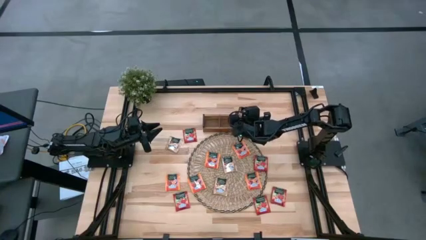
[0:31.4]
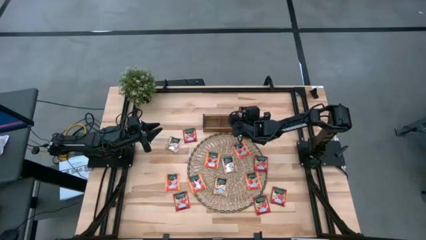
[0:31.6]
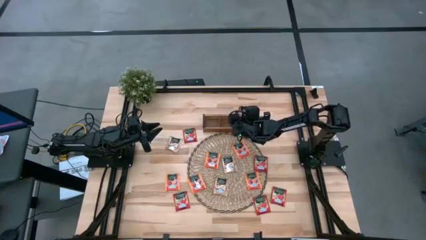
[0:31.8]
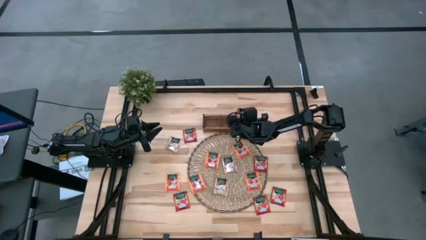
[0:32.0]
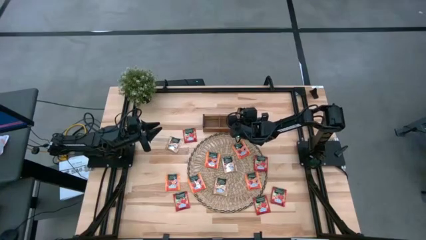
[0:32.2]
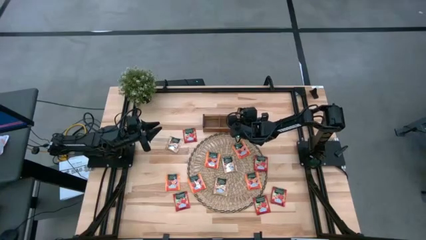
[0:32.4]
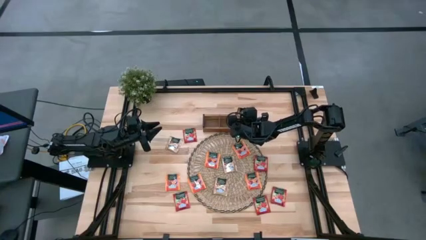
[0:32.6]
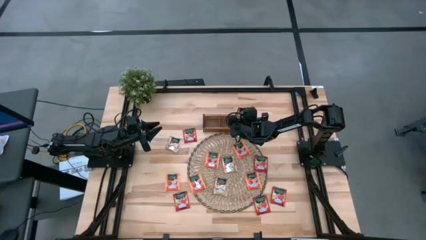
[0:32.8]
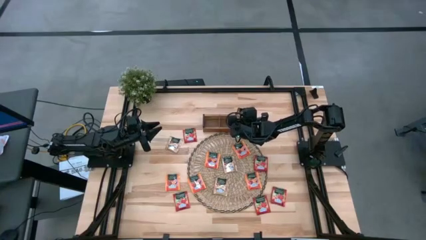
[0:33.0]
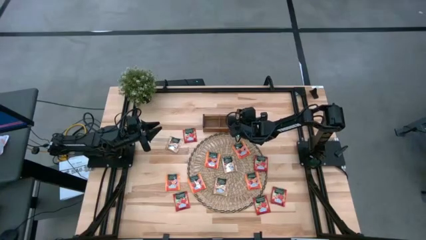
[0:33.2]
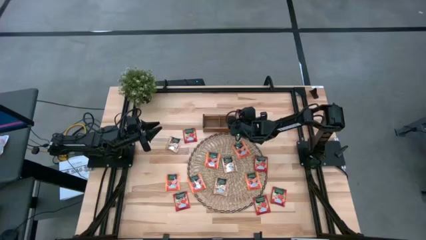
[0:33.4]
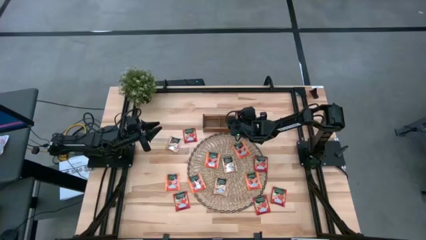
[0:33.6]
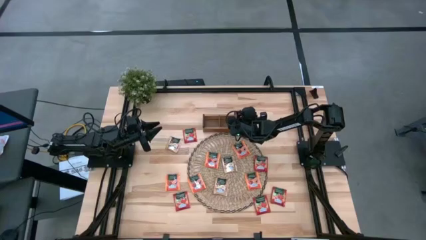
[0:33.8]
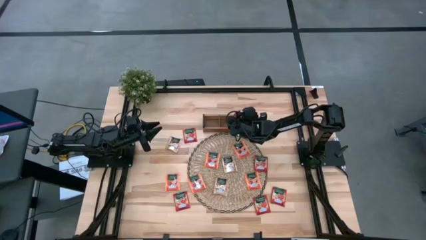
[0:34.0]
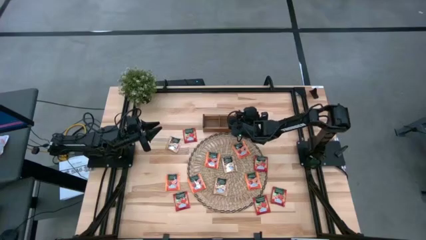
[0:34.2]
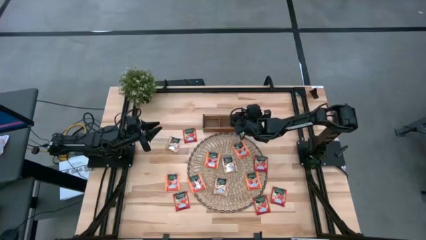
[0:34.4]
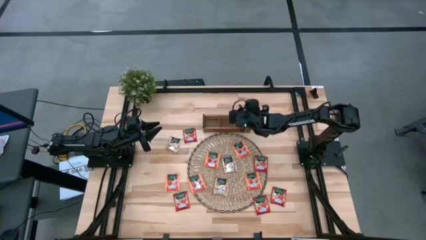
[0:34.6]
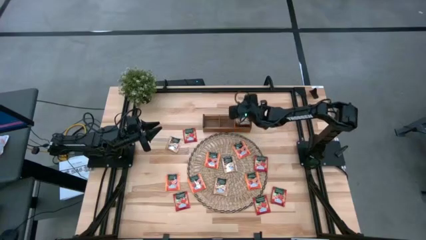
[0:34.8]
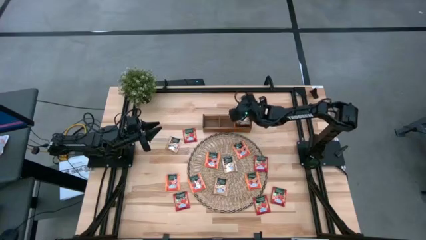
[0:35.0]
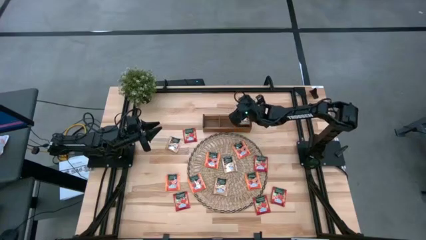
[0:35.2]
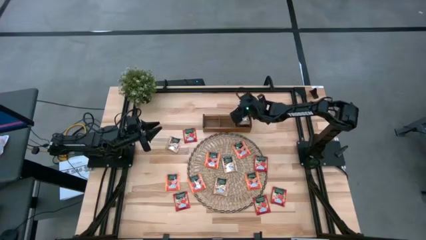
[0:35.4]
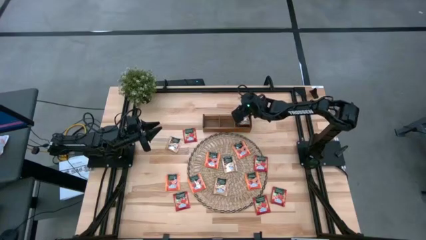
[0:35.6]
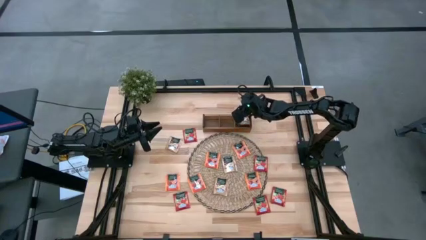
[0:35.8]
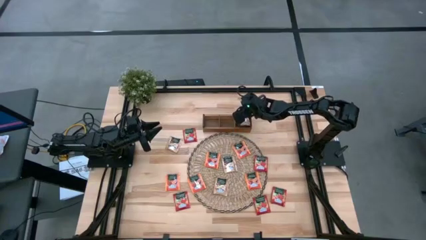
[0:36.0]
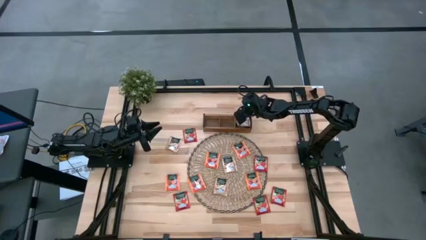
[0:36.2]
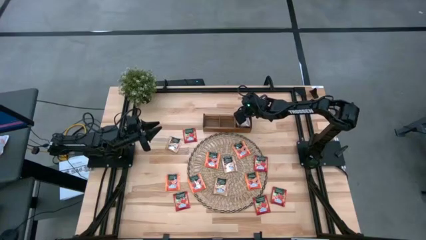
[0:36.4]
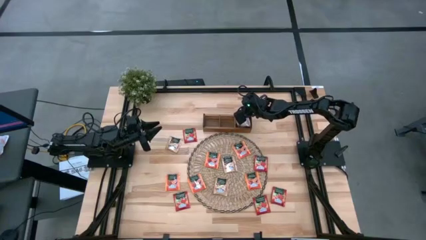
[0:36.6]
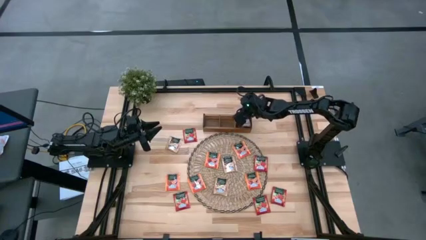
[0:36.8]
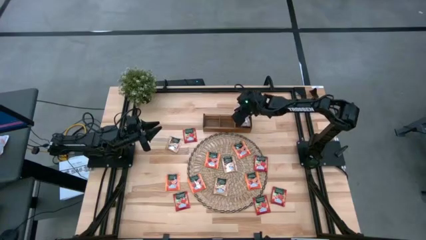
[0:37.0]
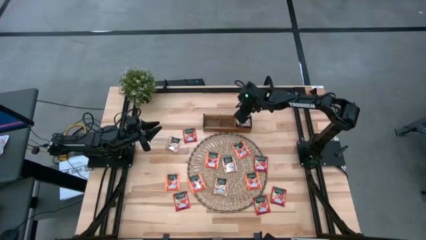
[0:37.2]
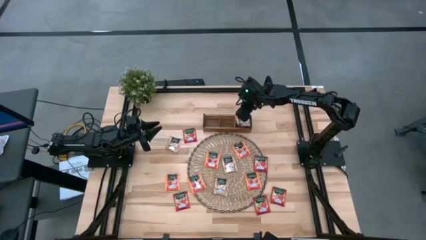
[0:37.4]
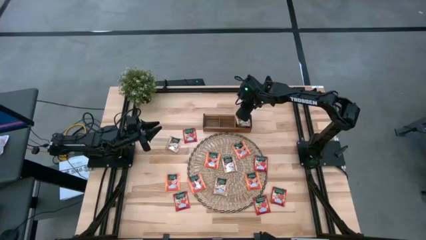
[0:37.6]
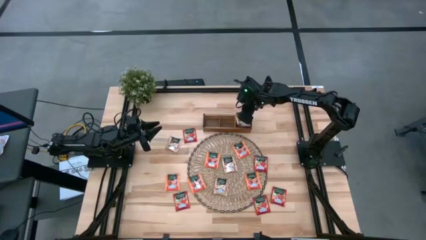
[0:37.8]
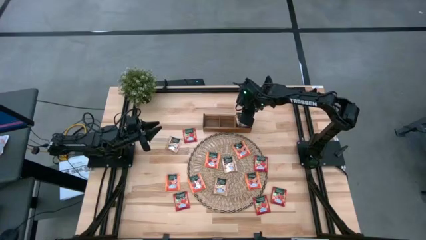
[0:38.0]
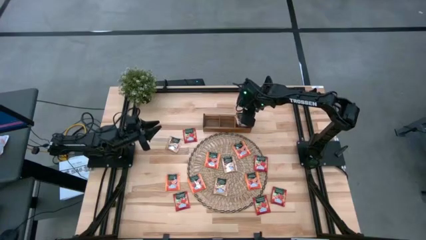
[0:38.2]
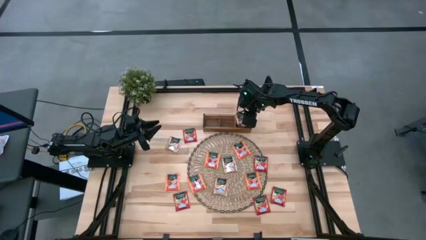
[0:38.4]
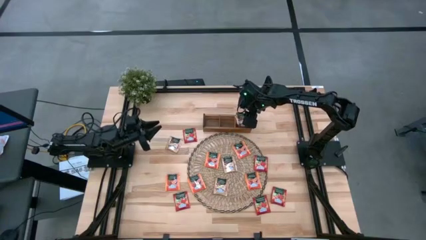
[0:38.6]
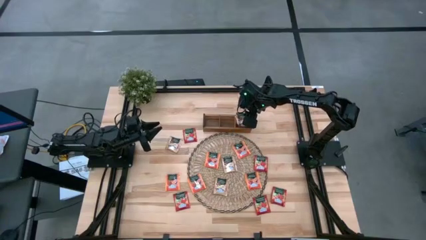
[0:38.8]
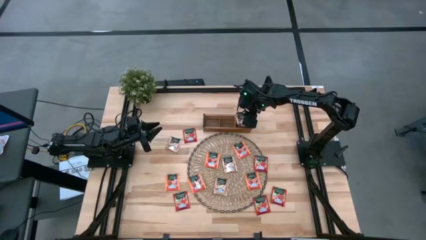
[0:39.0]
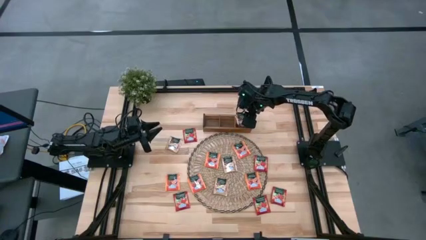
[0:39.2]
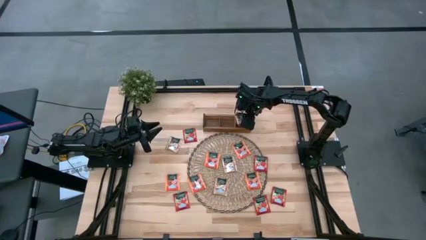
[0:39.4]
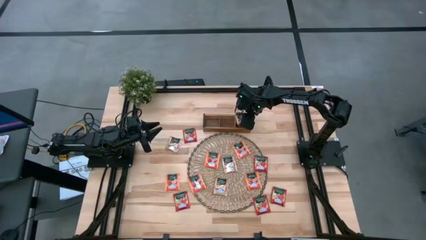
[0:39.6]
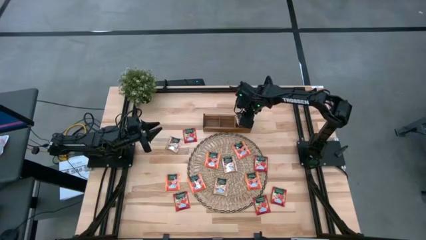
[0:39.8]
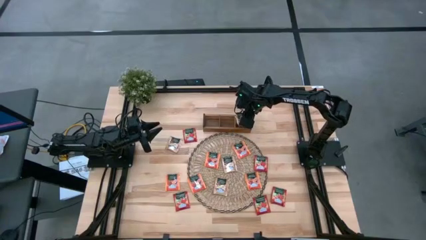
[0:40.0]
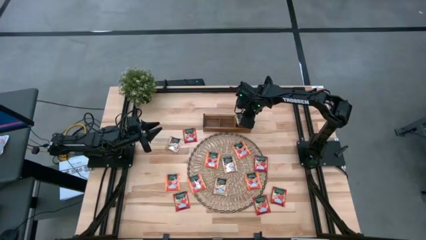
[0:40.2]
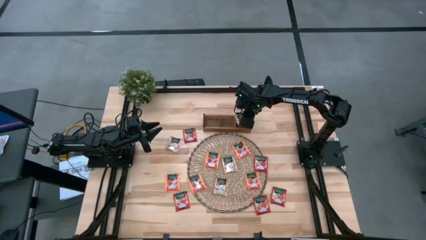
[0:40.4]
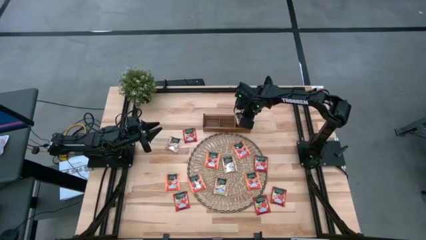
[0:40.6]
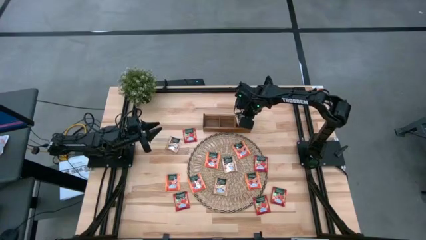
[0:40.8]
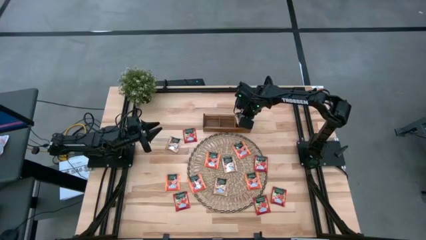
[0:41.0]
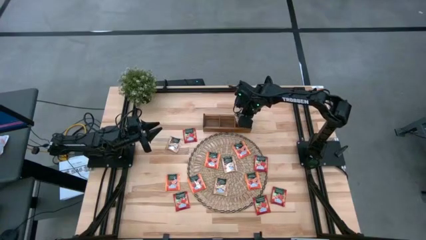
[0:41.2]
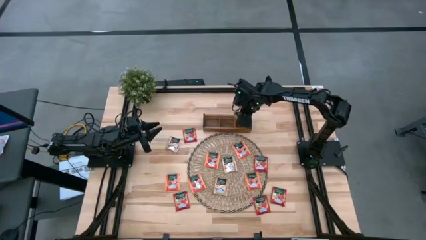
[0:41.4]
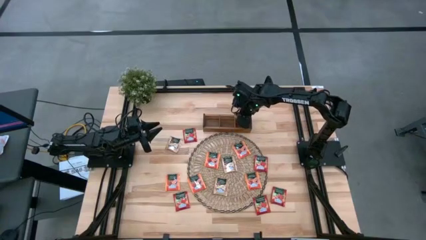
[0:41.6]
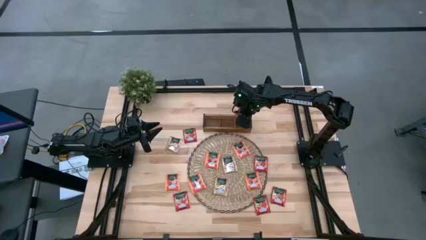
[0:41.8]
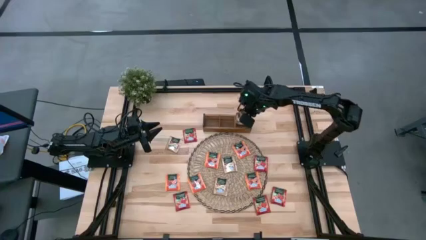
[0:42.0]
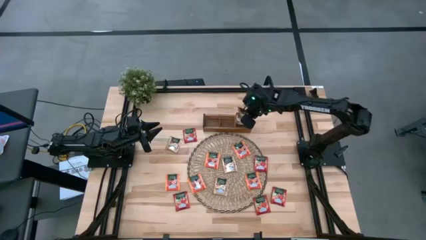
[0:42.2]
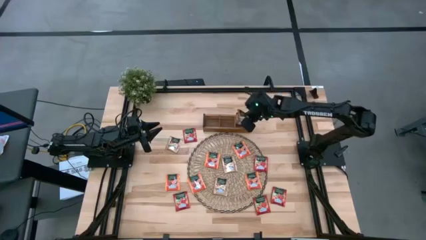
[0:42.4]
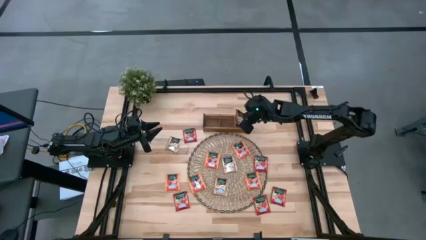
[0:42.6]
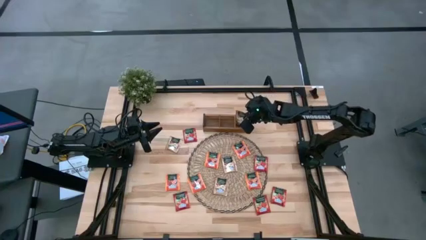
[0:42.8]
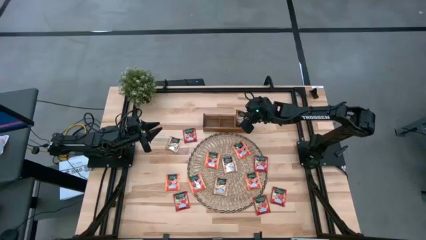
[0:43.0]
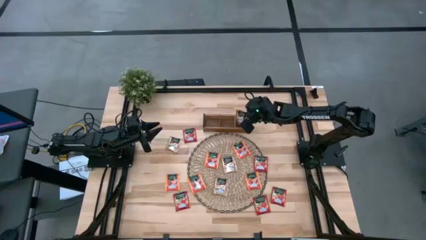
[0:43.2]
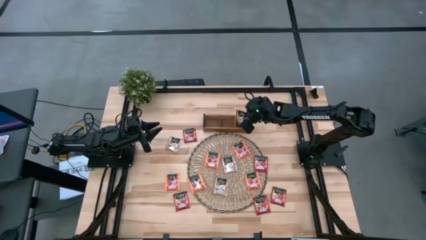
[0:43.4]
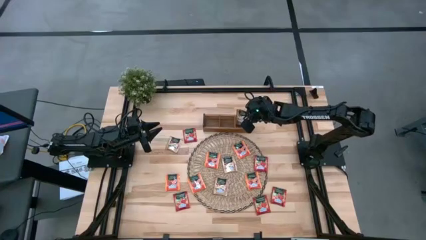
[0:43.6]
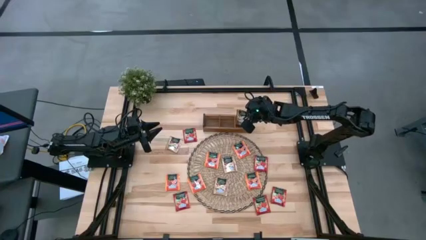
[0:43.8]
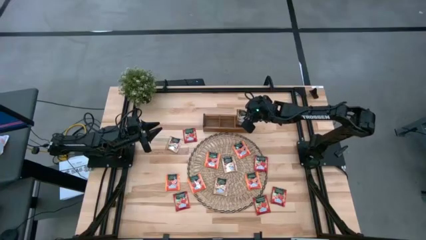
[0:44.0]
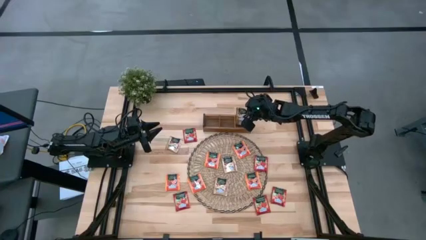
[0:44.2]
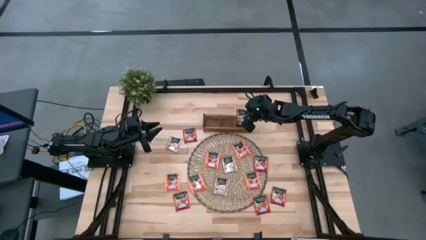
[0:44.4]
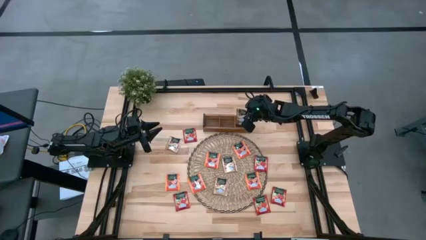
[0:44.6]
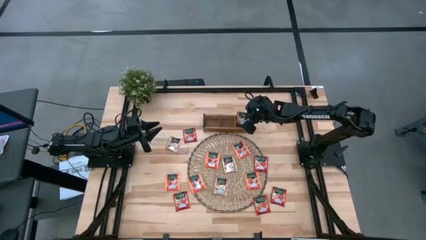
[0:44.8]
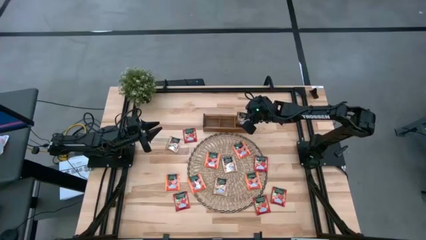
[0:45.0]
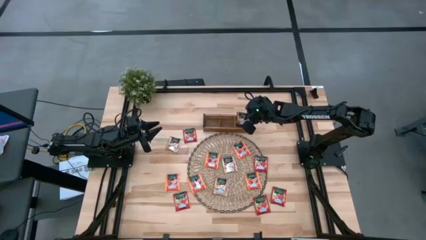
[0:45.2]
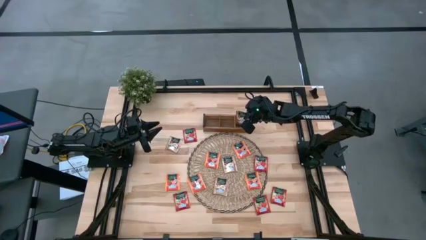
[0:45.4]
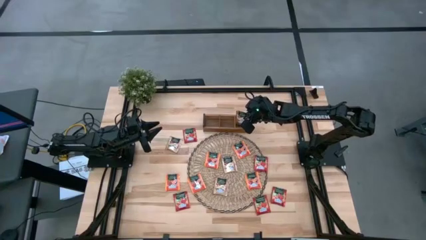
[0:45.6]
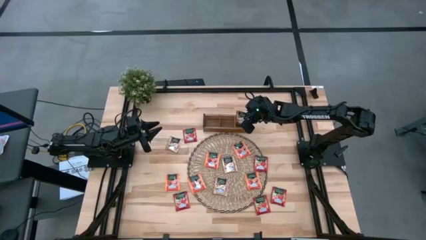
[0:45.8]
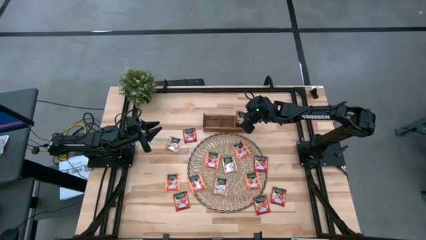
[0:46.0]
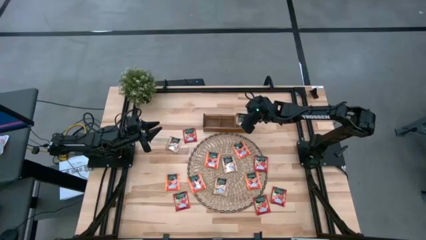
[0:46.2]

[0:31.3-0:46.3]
Task: Pick & Place Tea
Put the brown tea bag into the right section of the wooden organizer
